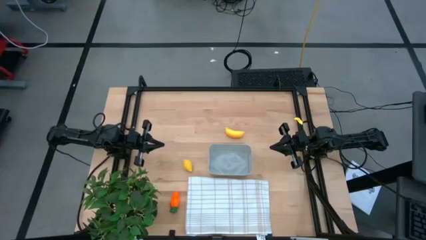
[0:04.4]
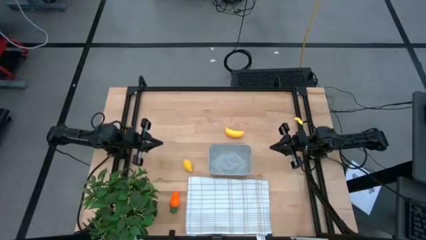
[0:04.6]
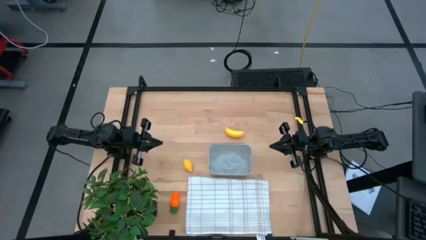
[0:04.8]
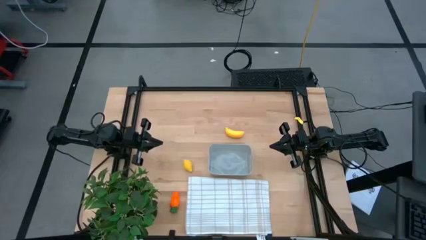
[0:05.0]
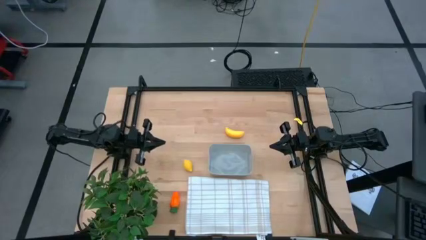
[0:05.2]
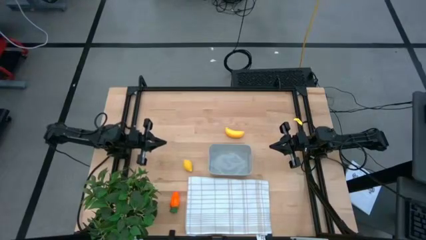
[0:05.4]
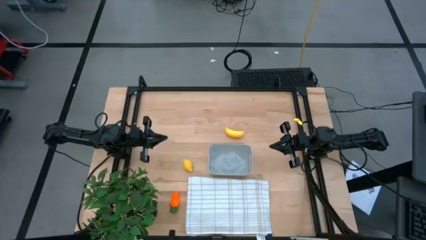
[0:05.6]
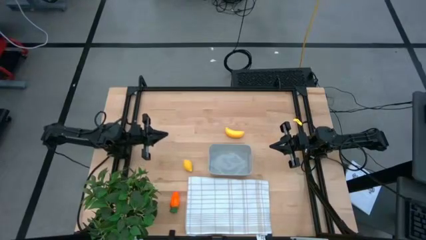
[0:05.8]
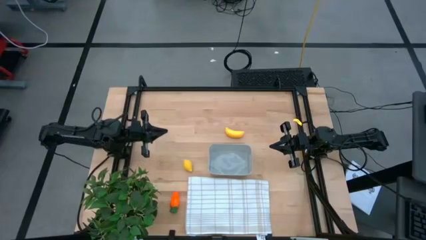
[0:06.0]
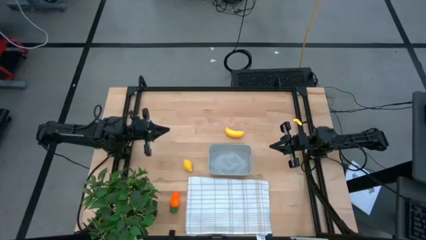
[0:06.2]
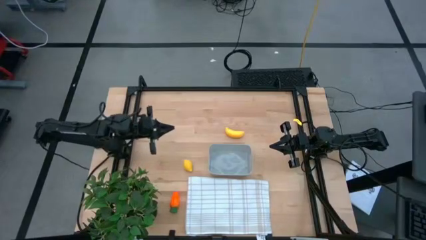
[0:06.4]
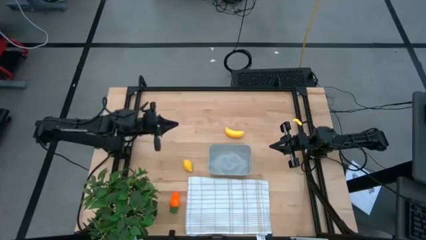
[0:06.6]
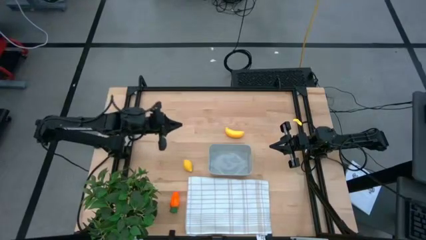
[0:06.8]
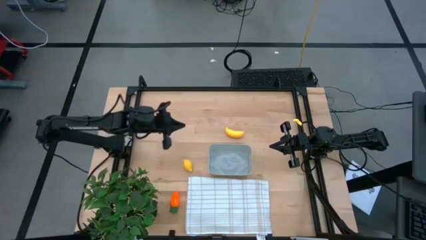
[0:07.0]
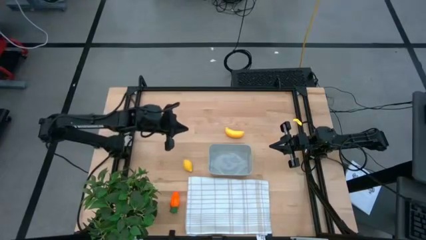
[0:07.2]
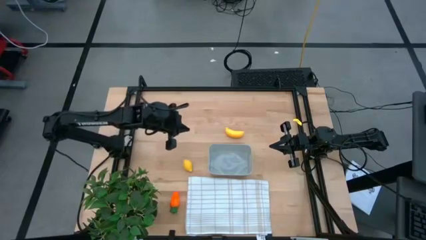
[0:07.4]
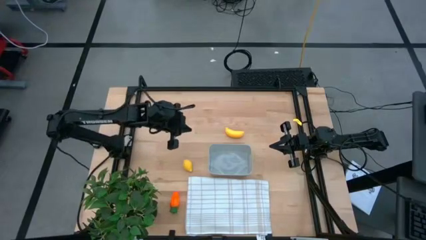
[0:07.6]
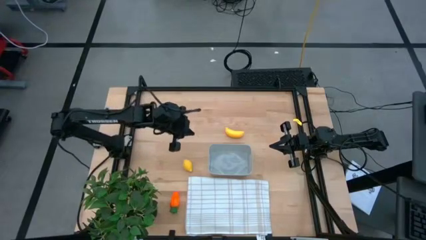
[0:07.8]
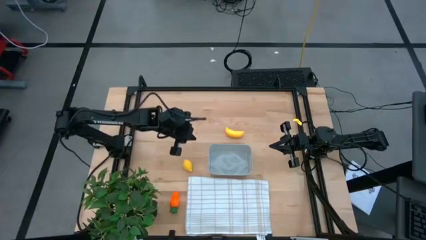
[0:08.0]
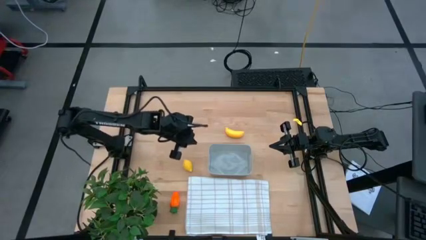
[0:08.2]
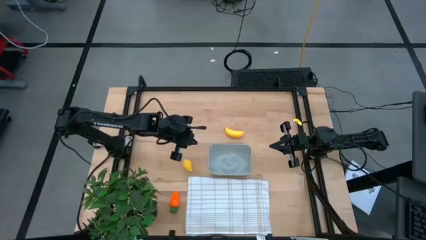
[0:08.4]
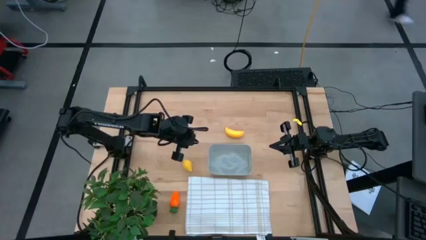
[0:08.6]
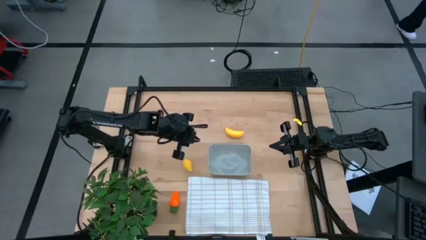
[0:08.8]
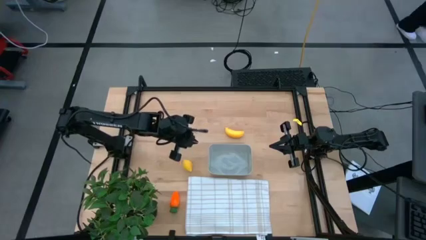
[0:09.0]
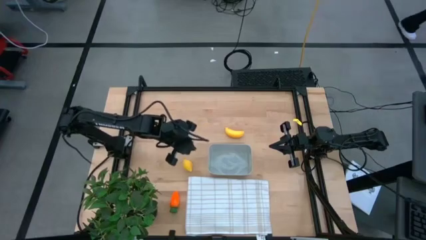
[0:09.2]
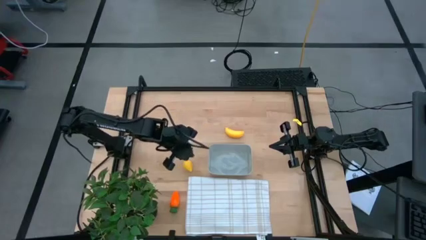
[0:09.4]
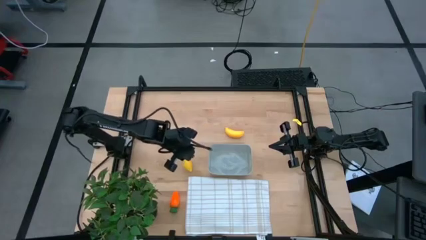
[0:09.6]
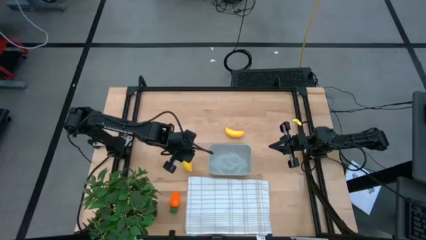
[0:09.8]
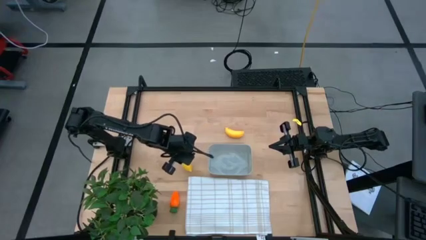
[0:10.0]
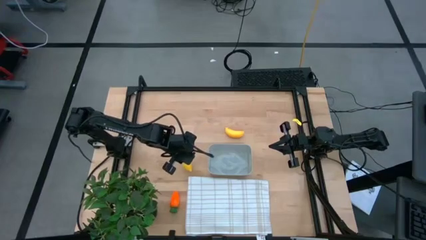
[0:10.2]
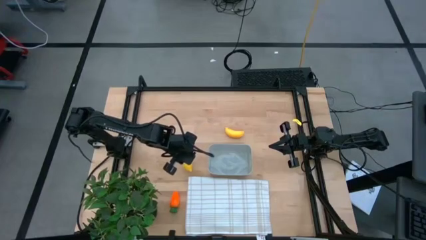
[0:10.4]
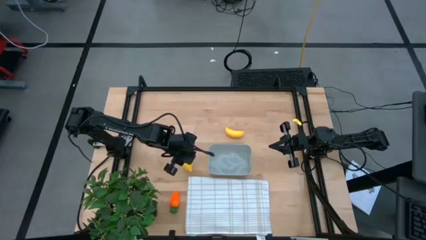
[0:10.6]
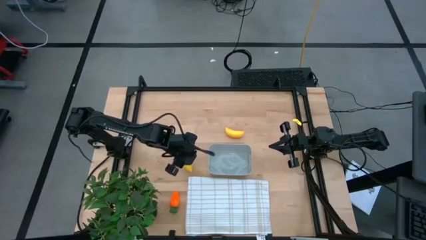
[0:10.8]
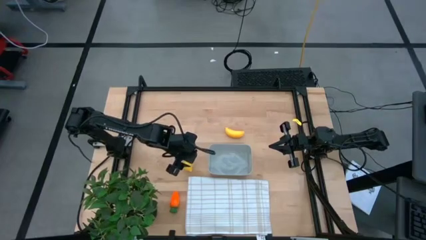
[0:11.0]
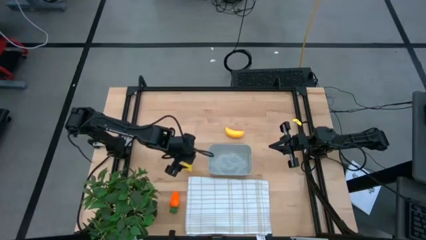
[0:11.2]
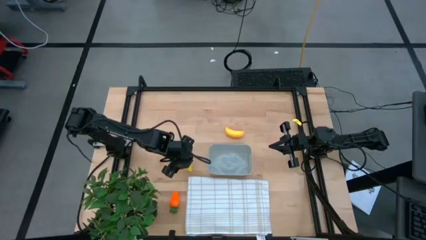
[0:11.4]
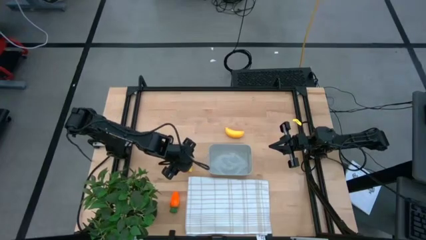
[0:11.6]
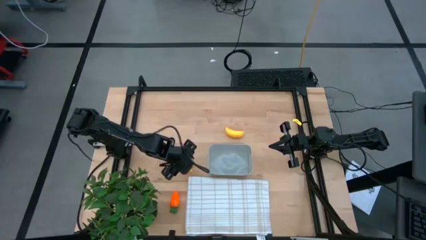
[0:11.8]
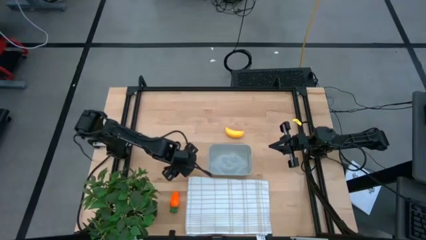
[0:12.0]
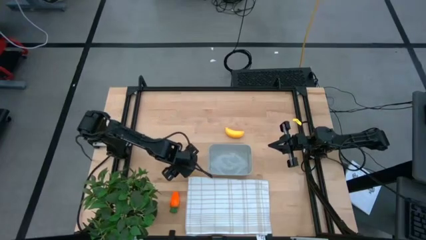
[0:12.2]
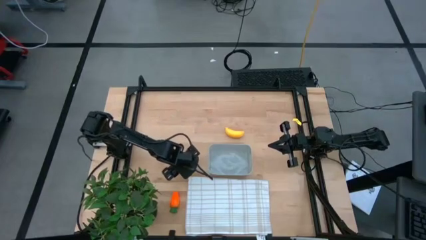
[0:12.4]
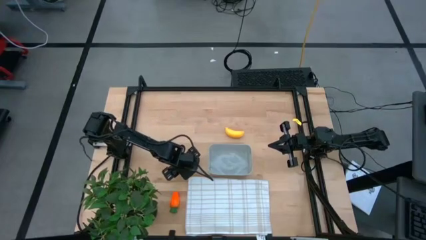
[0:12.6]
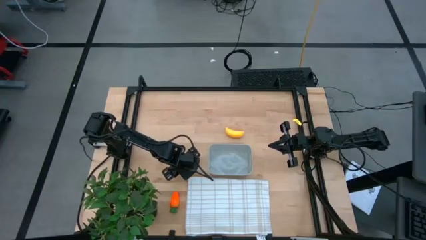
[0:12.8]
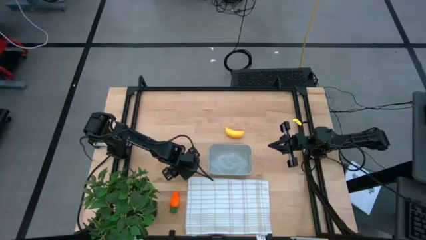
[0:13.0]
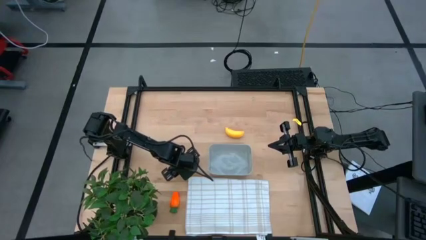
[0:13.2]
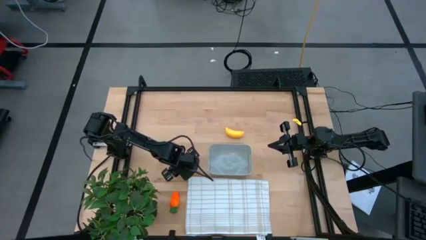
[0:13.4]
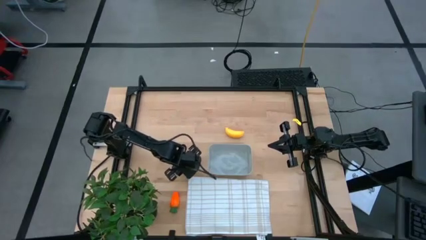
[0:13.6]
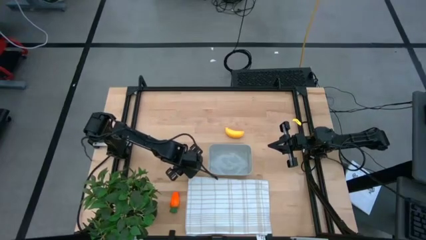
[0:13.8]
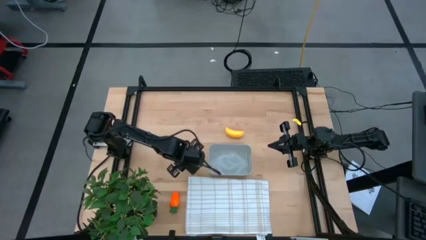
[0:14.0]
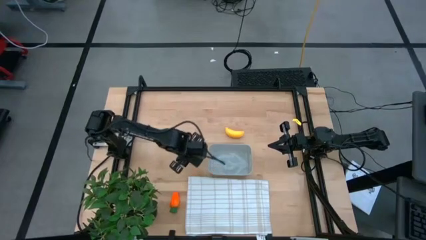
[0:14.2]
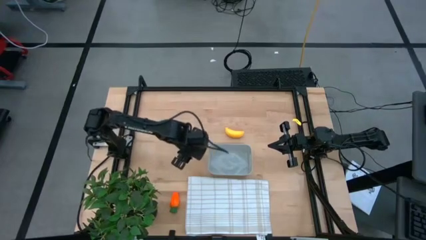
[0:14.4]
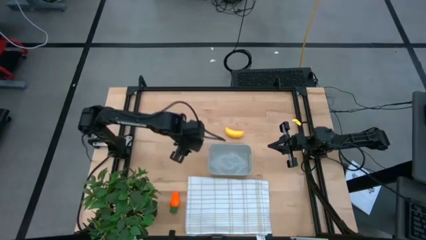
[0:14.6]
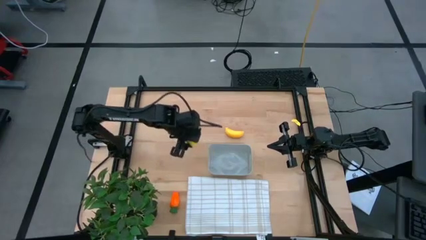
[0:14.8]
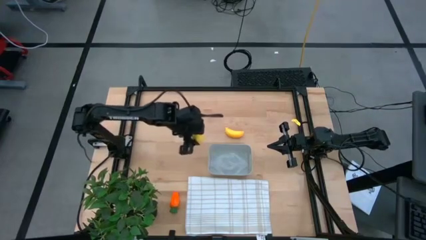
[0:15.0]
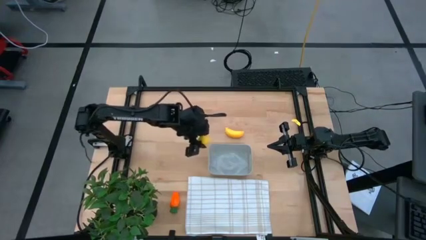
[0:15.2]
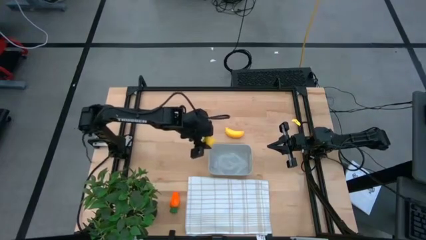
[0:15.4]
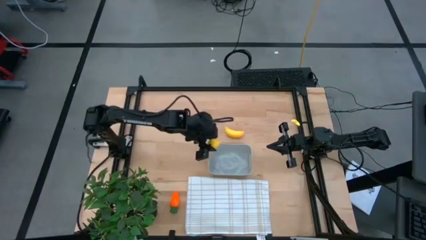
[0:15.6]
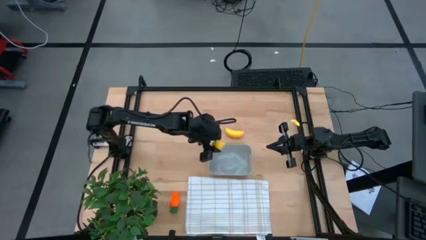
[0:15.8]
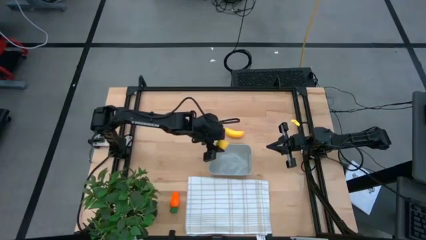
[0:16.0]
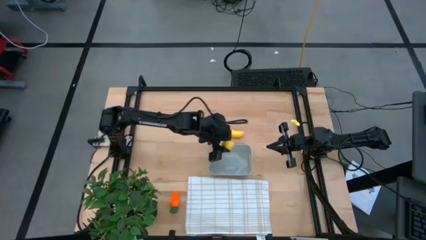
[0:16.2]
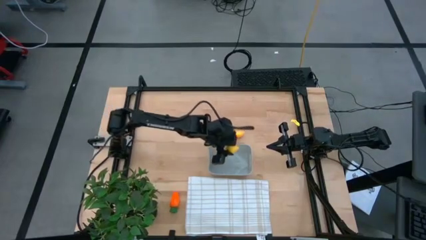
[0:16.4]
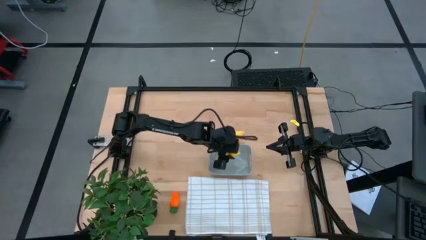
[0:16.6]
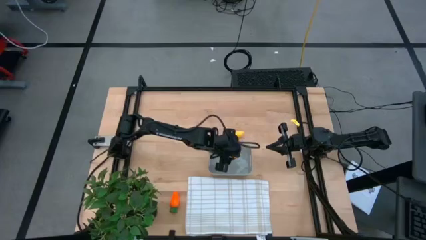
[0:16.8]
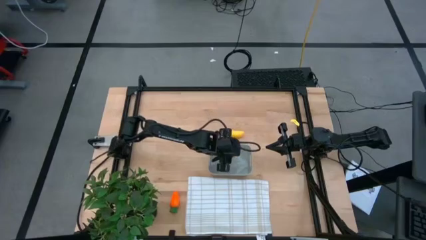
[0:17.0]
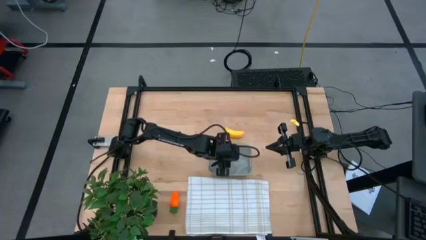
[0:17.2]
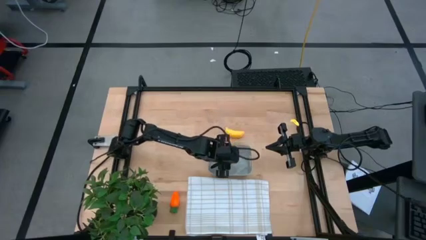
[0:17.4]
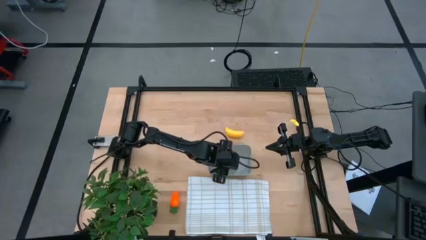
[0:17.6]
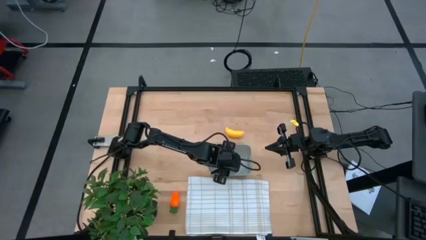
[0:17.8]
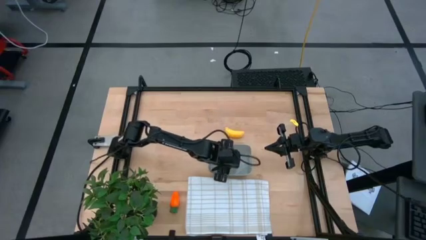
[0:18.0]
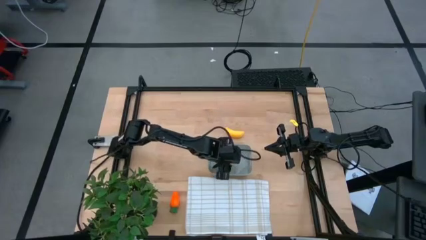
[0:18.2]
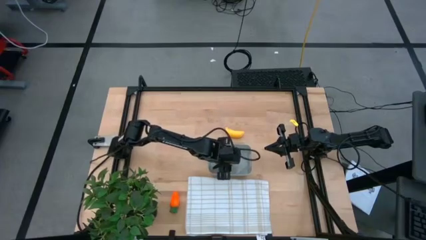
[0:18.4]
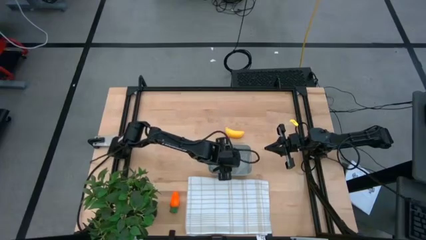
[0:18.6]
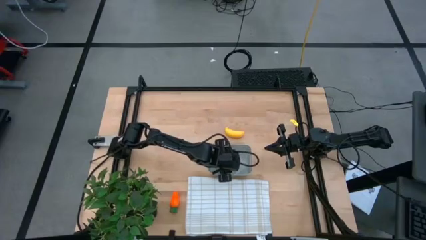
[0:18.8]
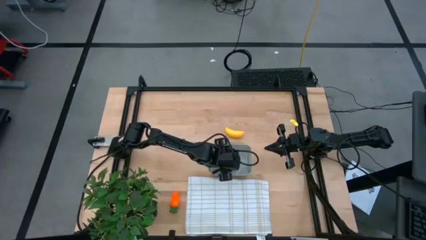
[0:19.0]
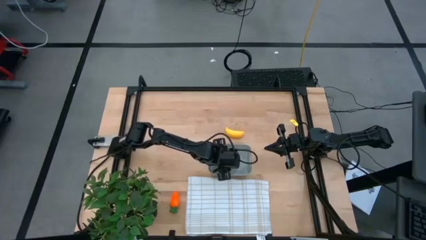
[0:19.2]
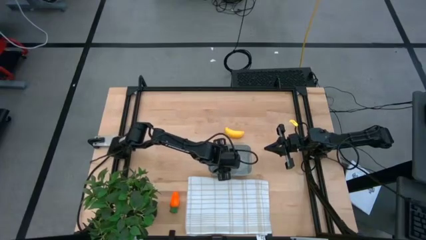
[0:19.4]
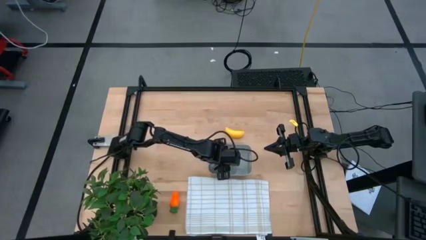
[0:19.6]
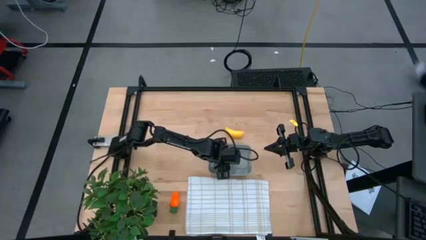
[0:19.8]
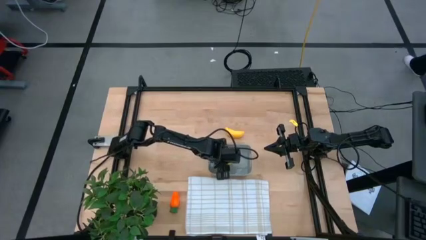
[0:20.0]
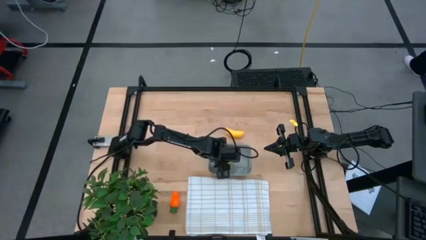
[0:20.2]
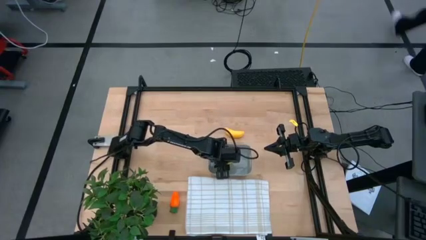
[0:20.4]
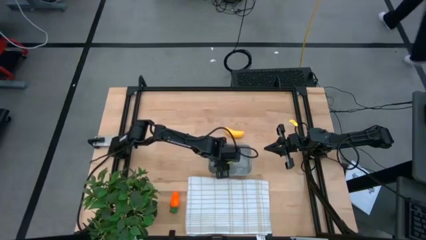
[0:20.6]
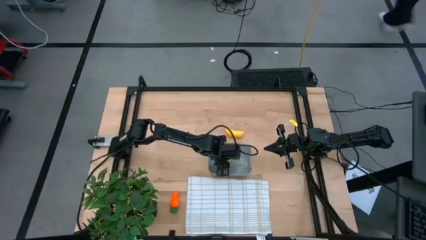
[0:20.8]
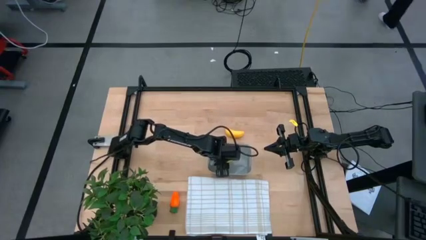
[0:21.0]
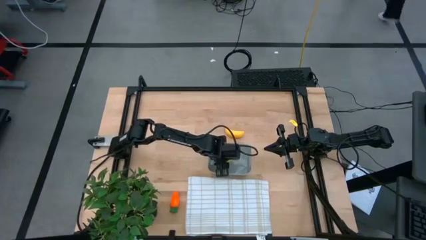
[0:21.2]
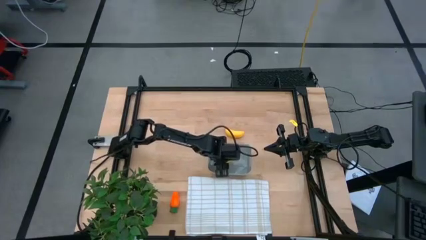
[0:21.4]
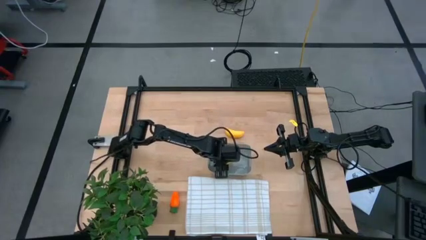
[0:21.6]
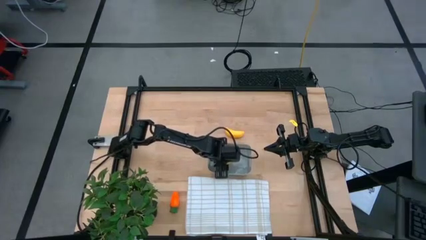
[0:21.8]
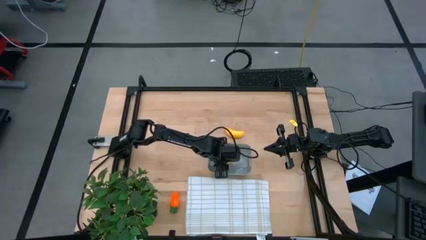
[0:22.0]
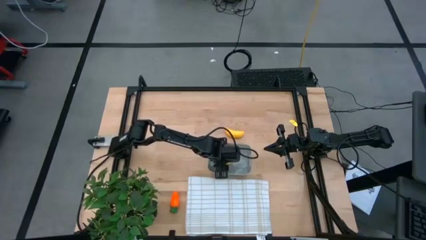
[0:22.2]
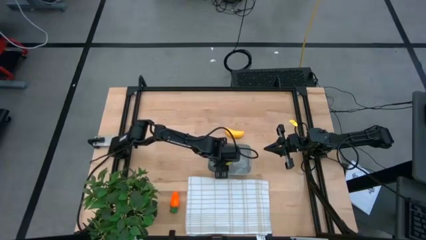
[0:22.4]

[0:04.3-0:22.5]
Task: Pick and placing Produce into tupperware
Put the yellow lemon into the bin
